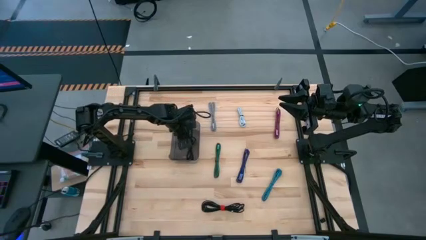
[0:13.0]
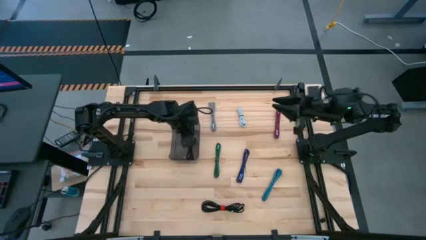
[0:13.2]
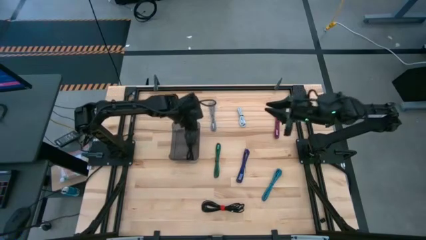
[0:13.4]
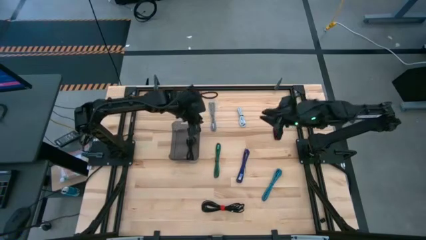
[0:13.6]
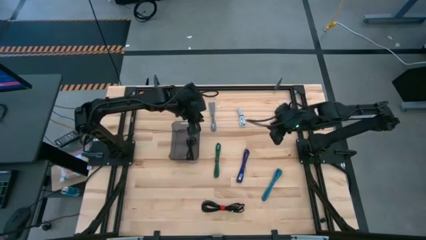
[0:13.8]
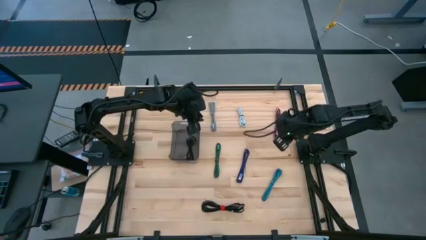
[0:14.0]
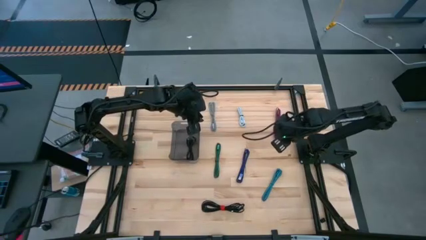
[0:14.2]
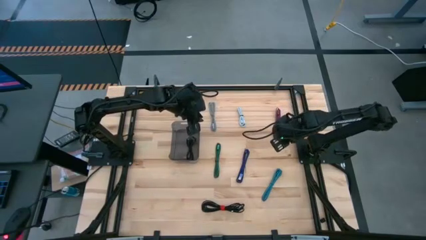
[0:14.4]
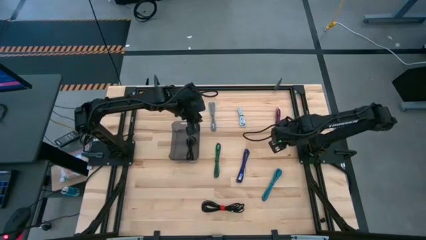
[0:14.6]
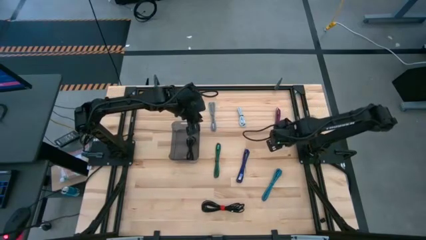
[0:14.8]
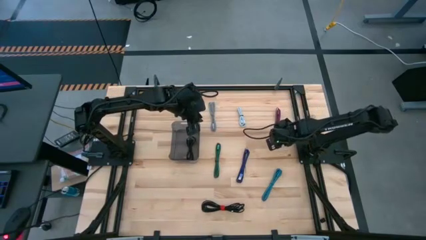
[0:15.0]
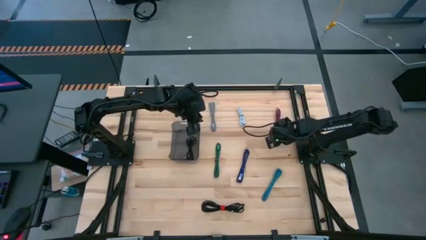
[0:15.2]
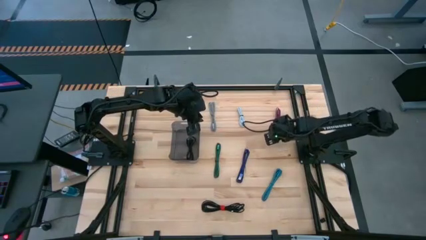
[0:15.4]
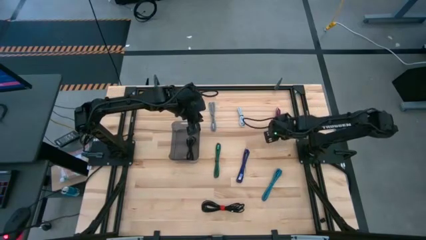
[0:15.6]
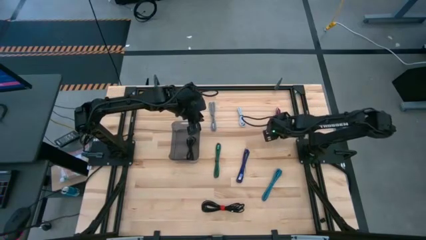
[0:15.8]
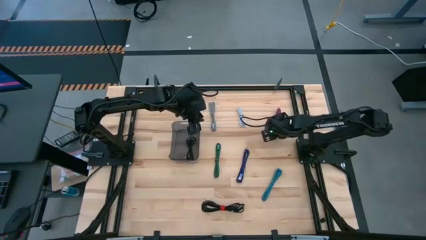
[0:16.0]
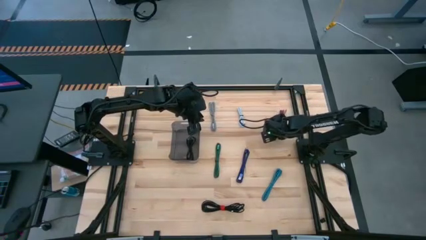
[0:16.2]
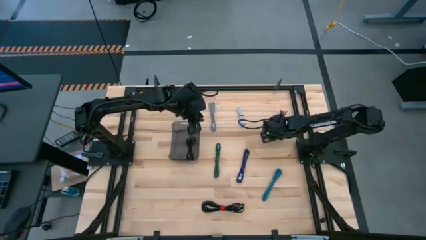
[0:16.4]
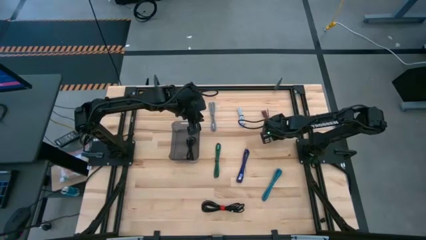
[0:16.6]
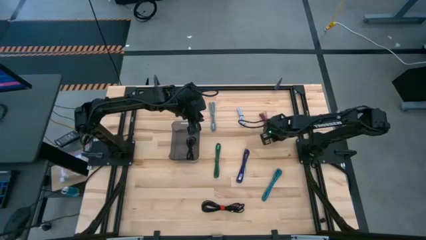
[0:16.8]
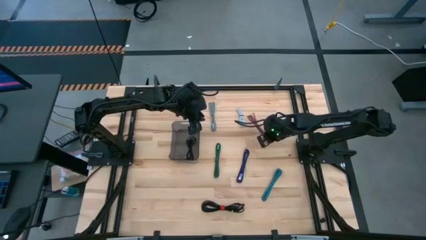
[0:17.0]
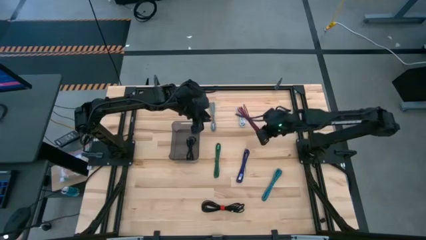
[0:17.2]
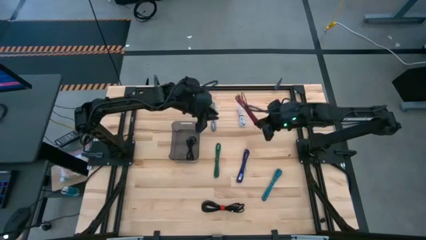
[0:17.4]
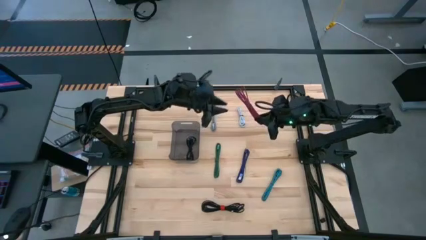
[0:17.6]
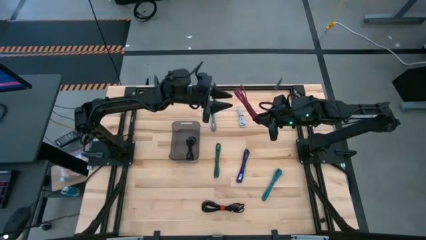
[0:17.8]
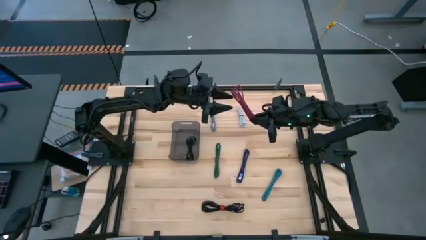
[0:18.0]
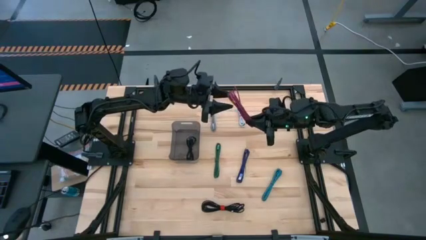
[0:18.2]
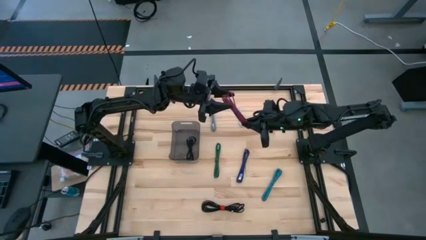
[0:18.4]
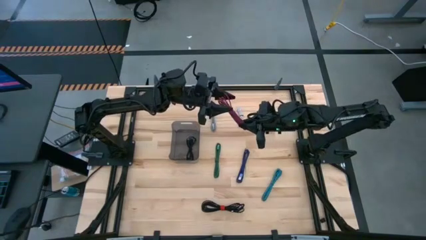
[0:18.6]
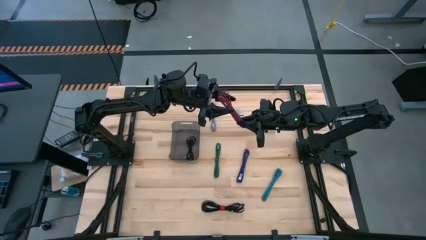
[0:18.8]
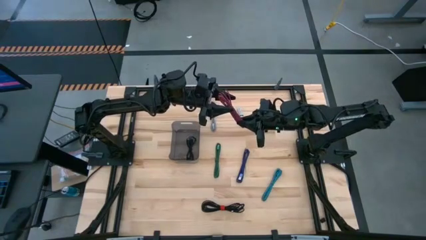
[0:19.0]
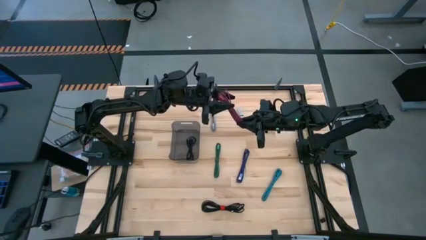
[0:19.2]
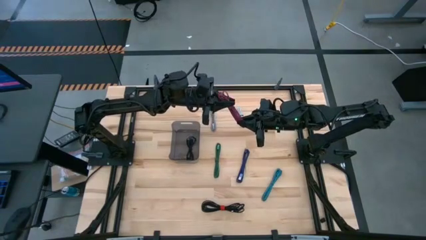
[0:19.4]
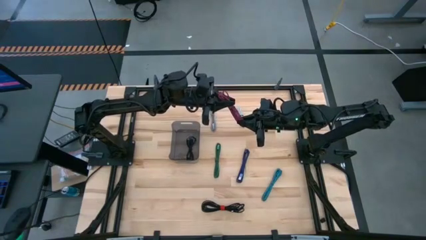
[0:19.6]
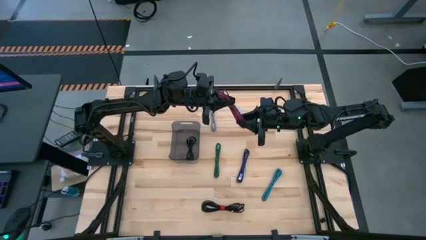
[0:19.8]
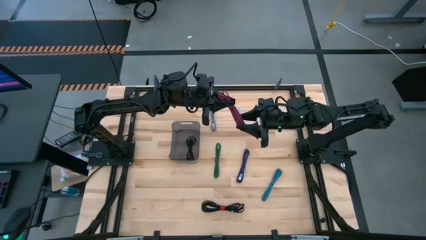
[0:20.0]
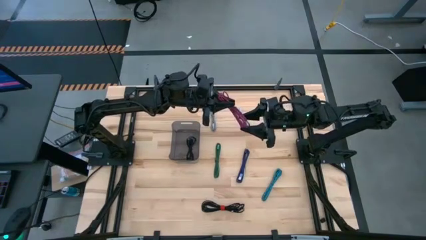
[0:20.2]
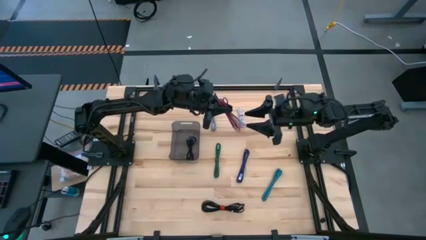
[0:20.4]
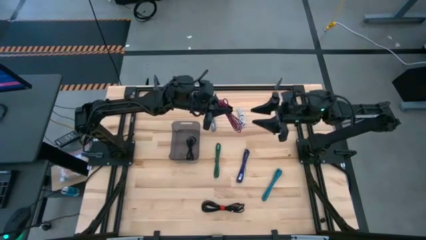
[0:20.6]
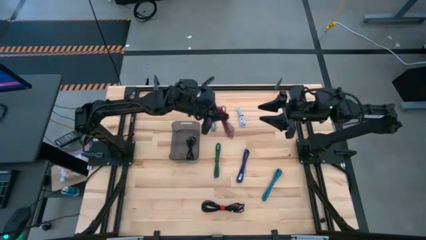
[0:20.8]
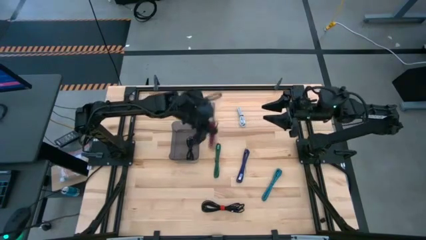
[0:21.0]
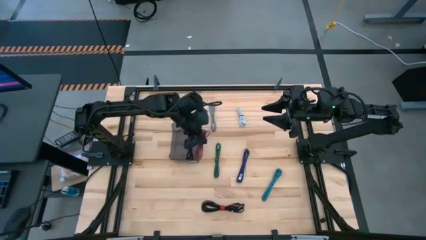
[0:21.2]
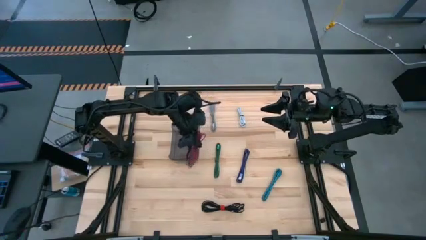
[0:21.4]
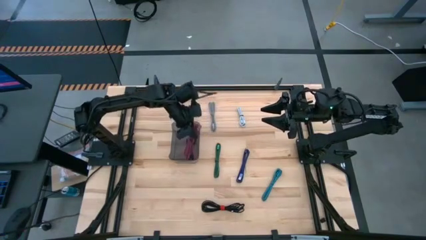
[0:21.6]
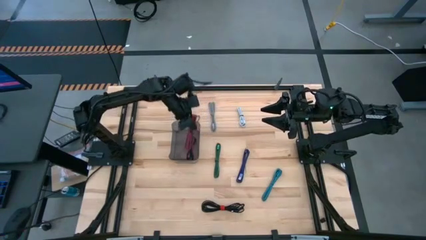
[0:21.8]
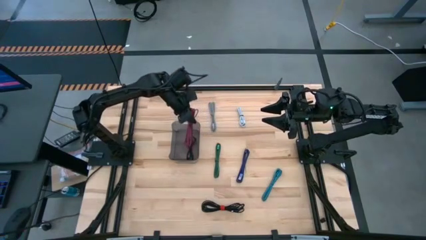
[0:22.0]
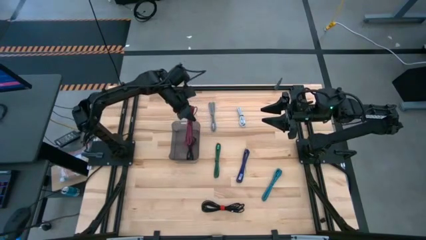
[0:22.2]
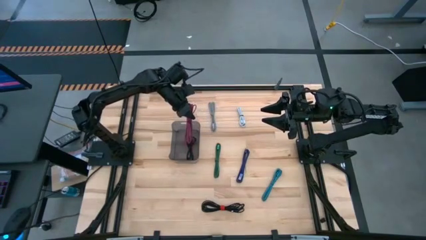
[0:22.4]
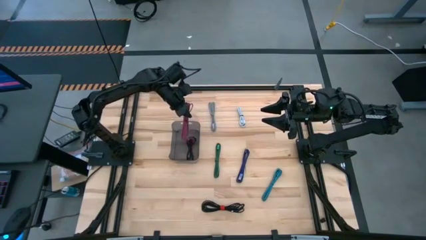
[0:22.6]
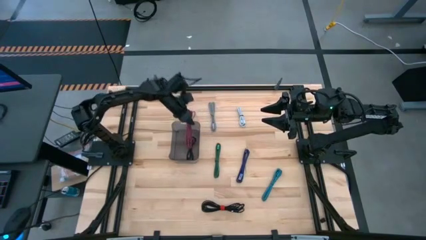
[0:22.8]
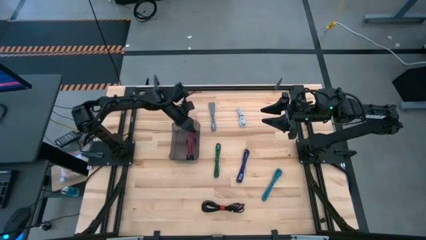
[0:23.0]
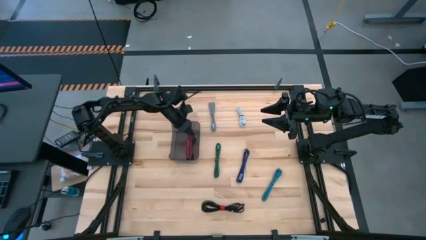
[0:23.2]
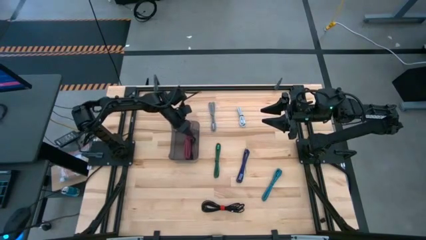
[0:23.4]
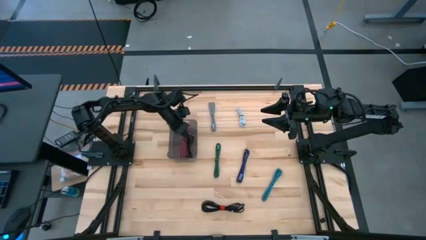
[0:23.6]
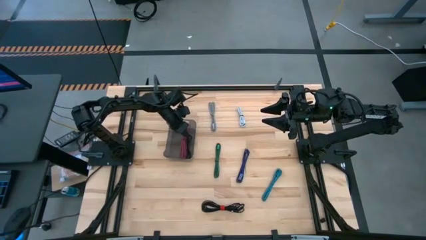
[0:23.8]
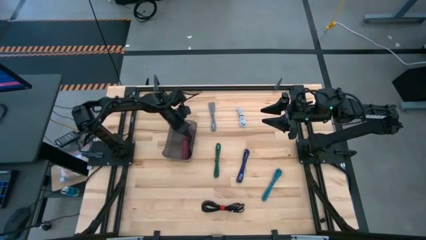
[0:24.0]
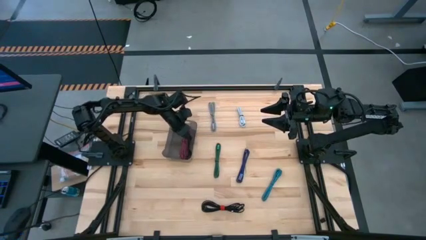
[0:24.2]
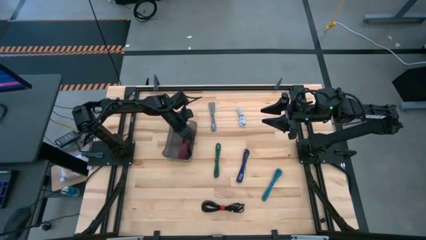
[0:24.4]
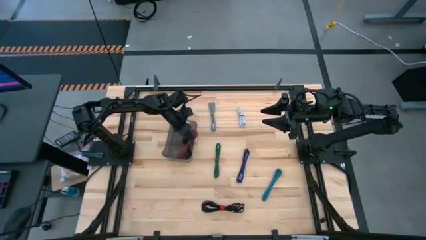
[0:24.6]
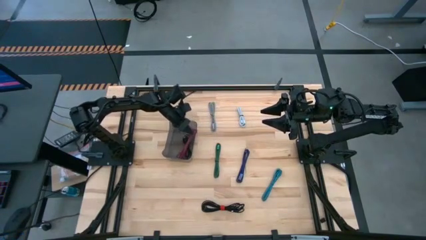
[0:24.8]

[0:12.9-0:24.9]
Task: Pick and place USB-C Cables
Put the pink USB cable into the black bin
